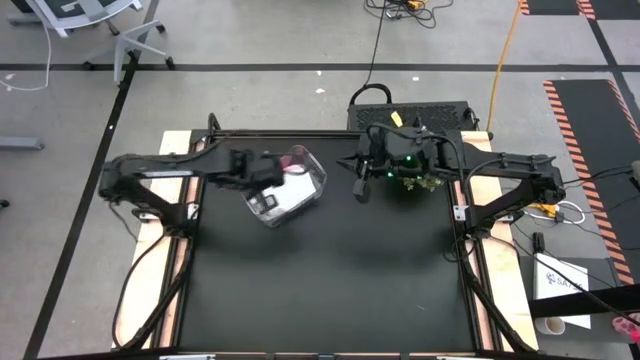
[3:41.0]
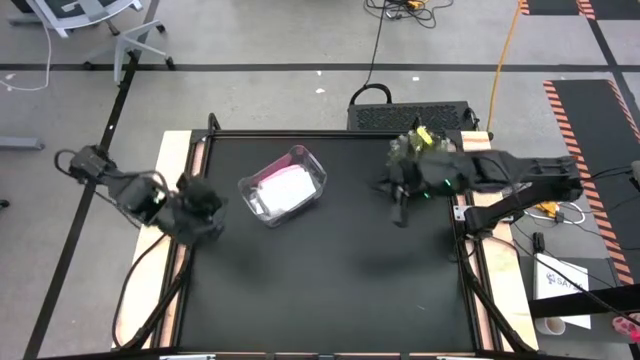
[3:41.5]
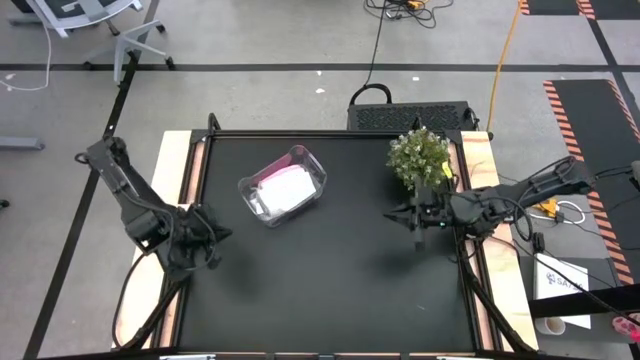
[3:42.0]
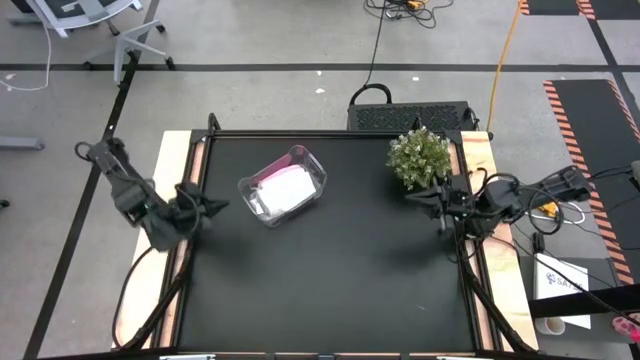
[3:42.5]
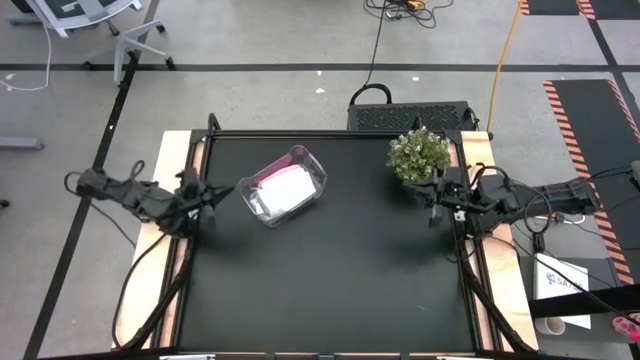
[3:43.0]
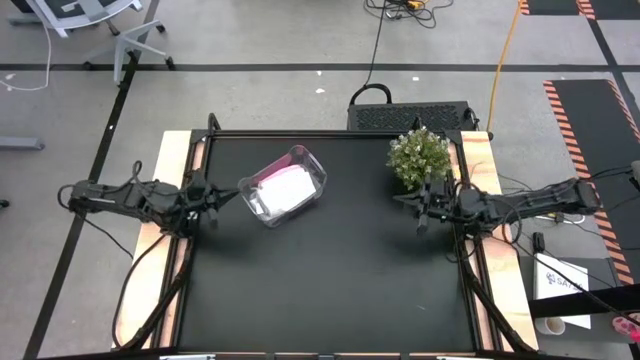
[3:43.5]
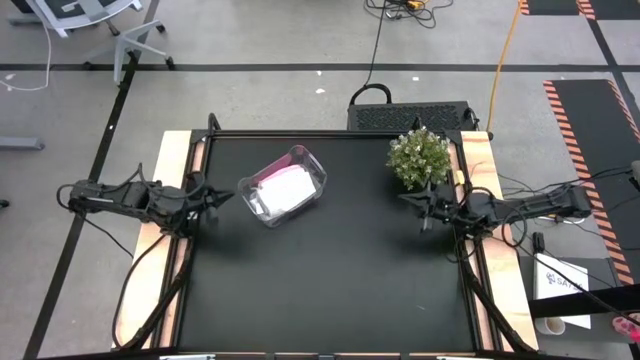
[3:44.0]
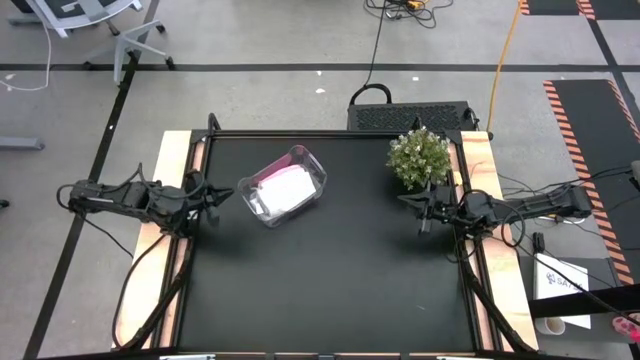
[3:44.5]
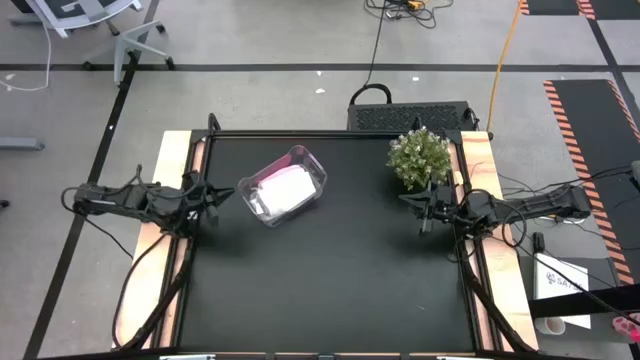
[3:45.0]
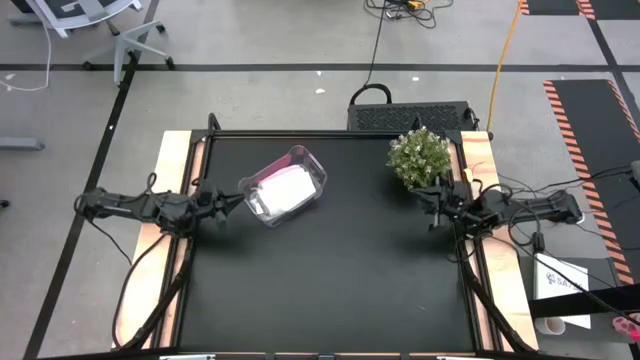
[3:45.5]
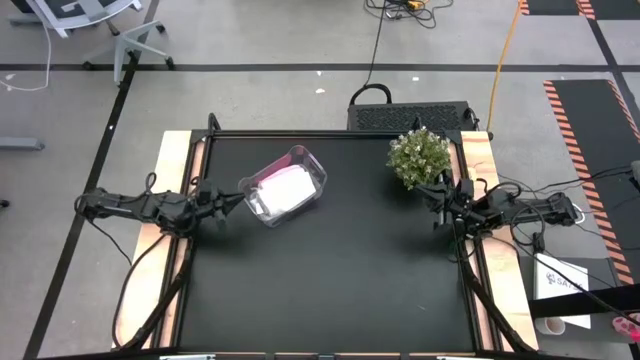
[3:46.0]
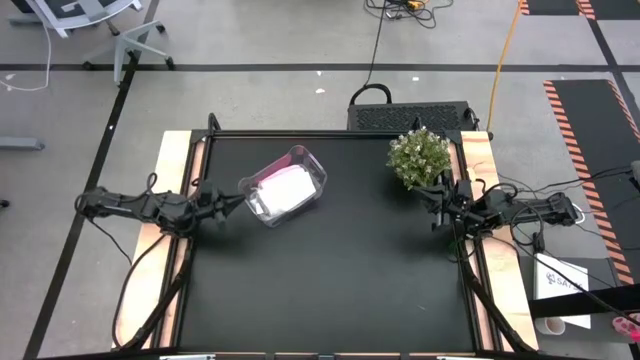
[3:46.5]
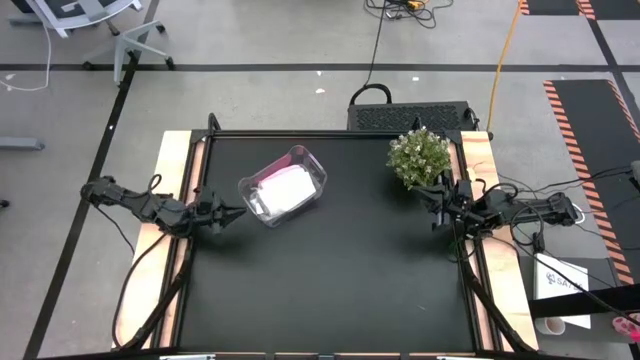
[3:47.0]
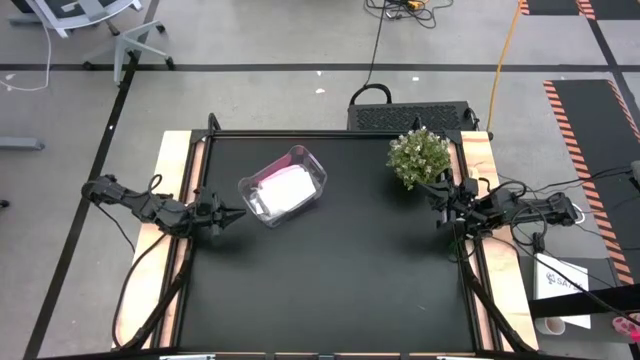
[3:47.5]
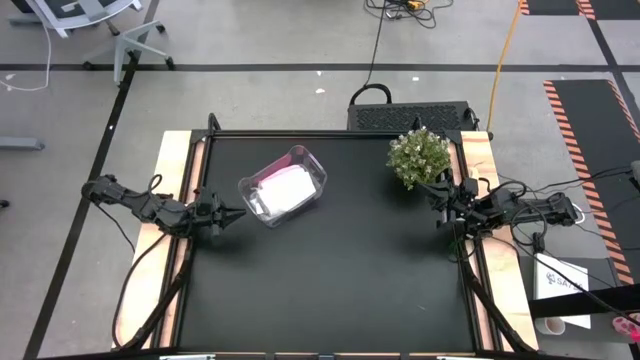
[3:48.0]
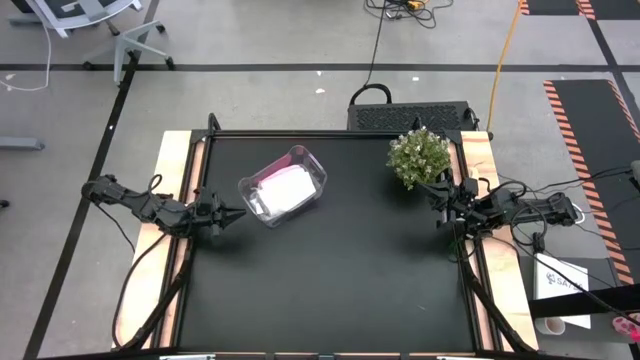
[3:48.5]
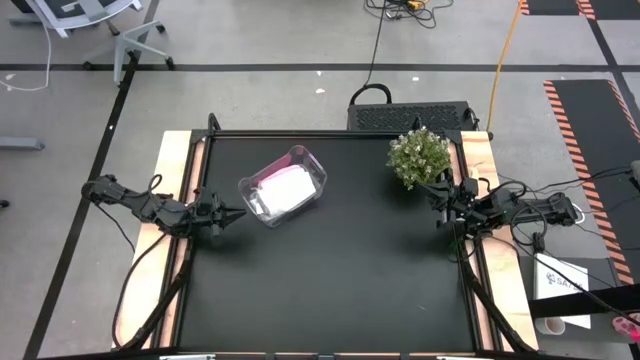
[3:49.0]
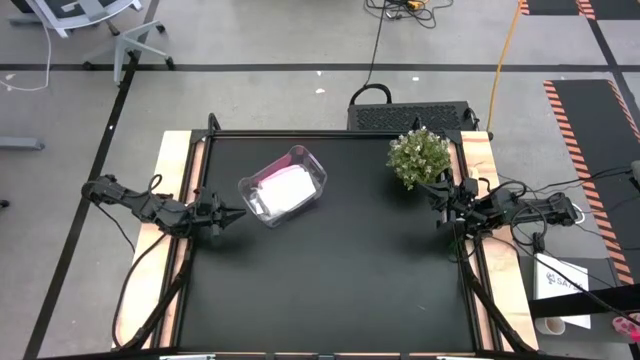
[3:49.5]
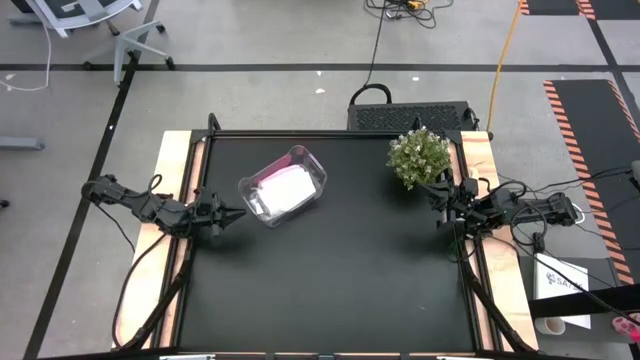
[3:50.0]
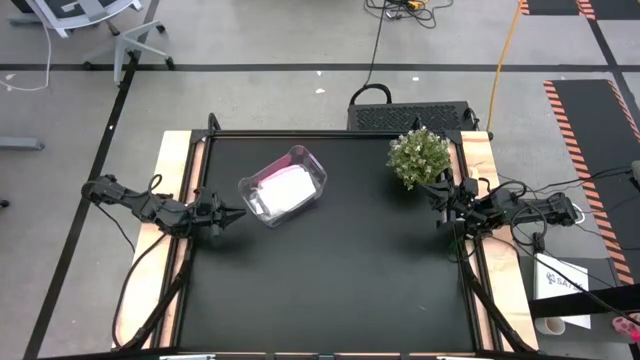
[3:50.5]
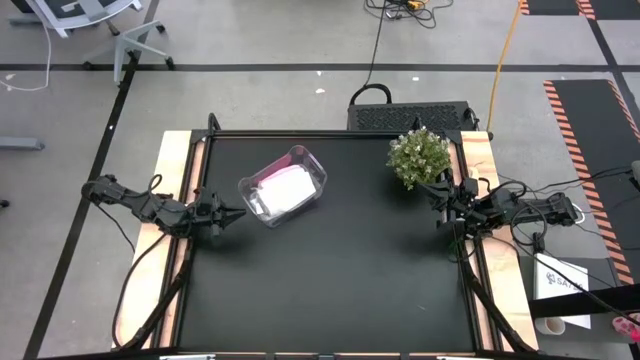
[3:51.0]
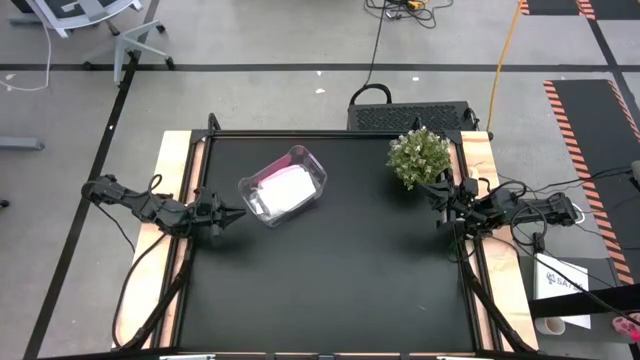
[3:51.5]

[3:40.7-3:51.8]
Task: Fold microfiber towels
Return to Home Position

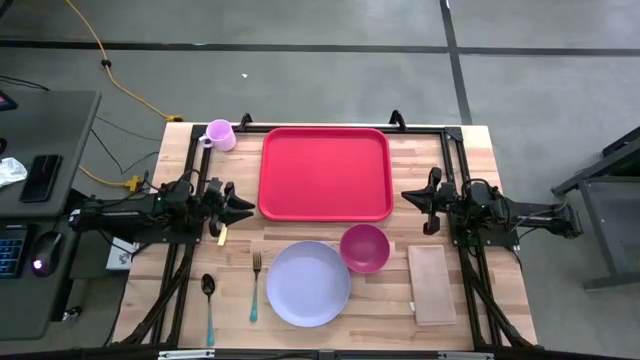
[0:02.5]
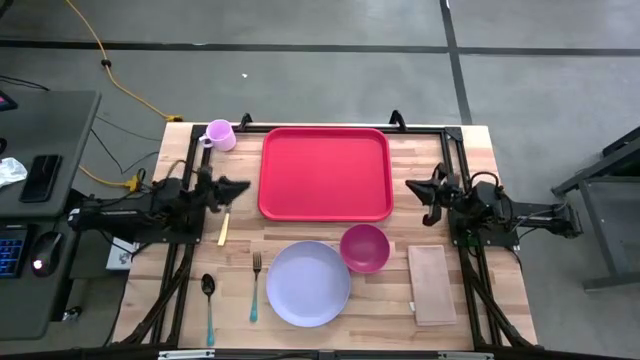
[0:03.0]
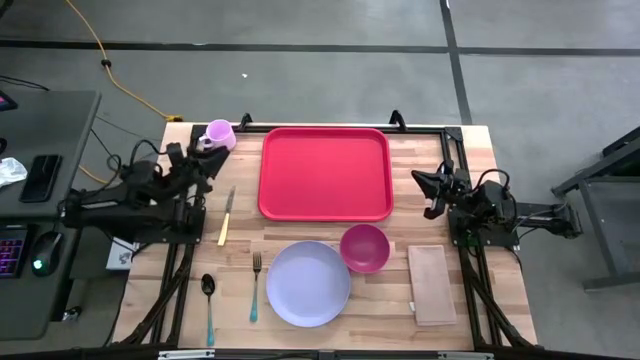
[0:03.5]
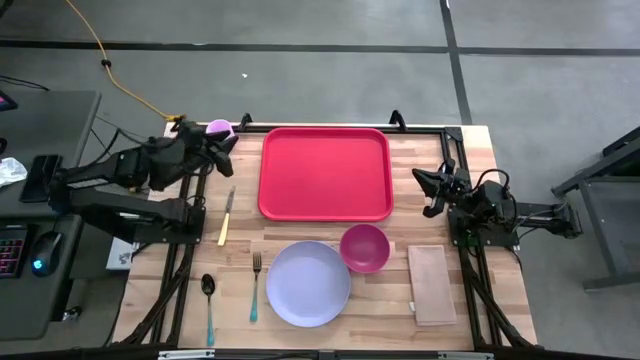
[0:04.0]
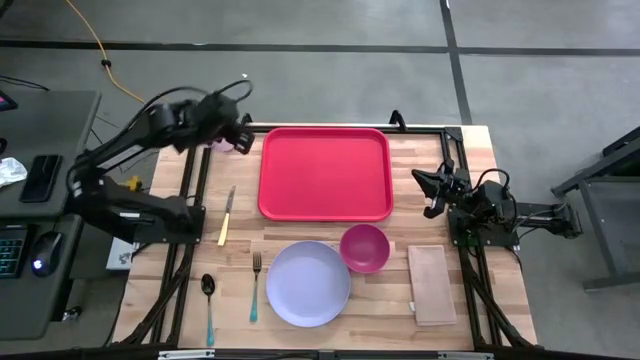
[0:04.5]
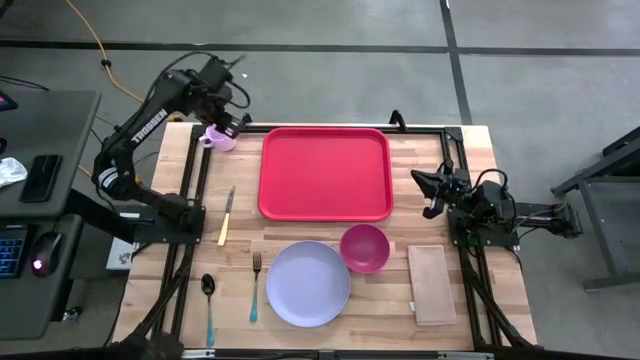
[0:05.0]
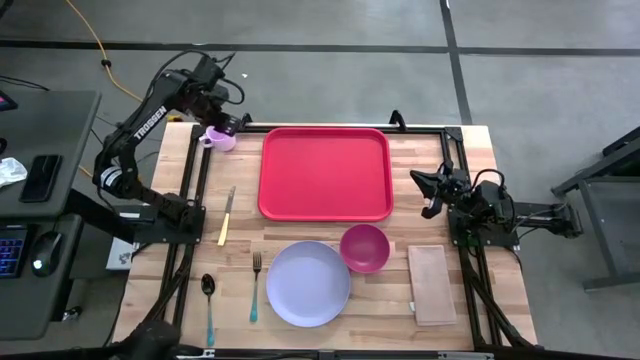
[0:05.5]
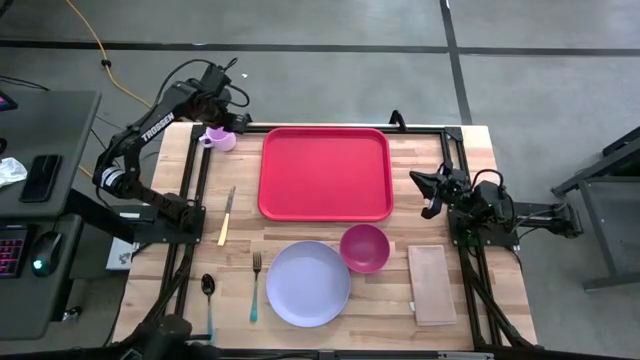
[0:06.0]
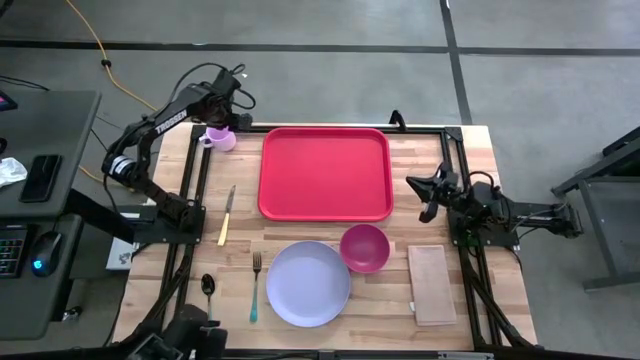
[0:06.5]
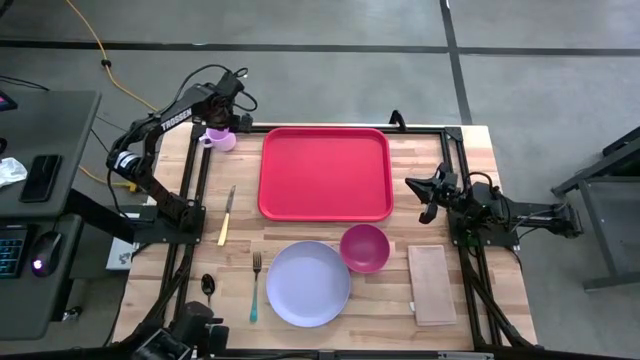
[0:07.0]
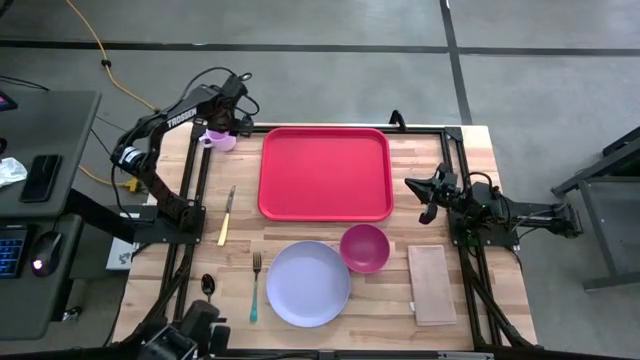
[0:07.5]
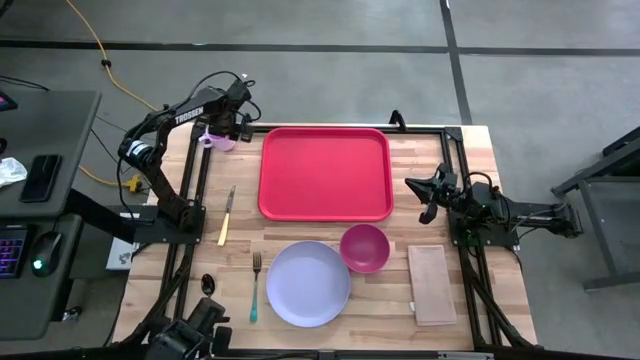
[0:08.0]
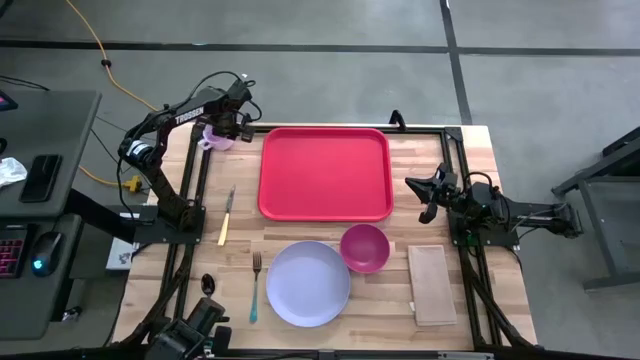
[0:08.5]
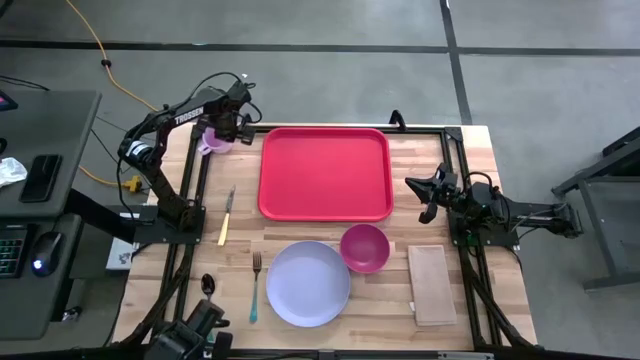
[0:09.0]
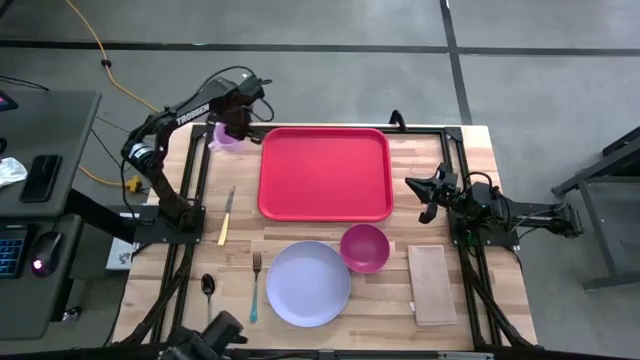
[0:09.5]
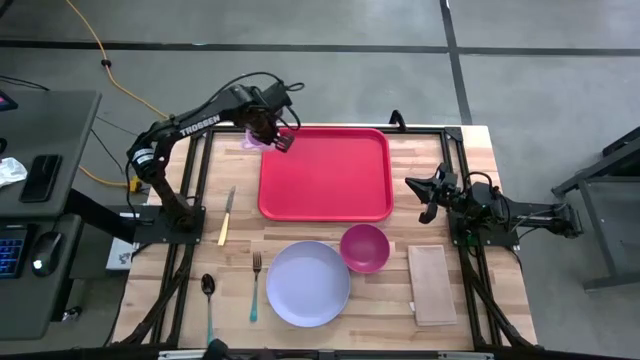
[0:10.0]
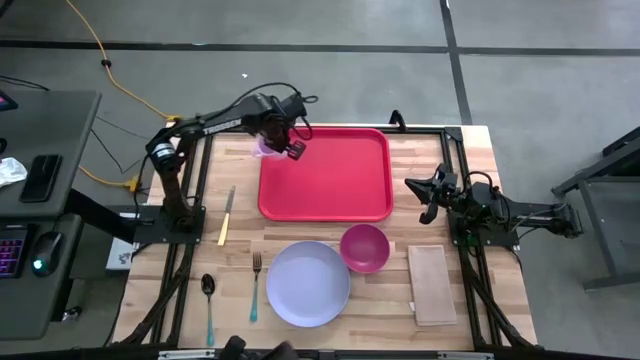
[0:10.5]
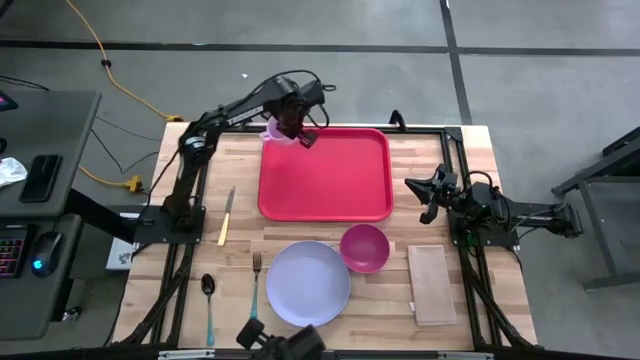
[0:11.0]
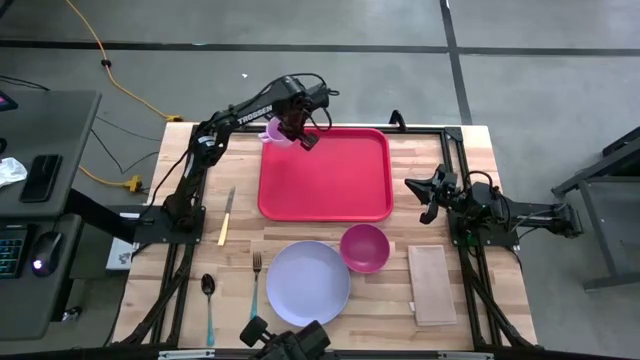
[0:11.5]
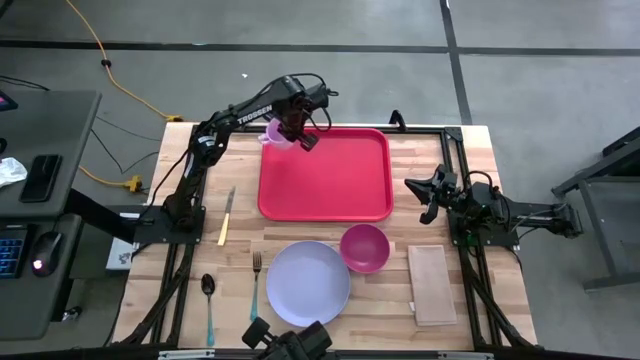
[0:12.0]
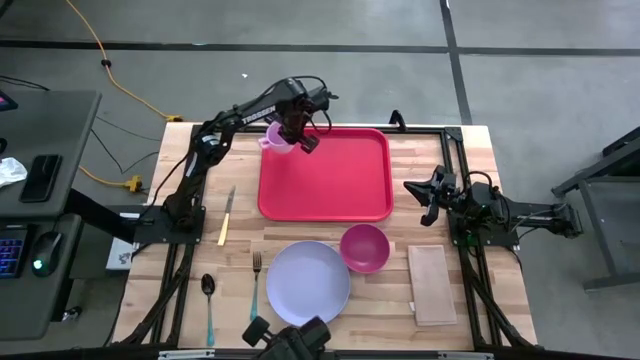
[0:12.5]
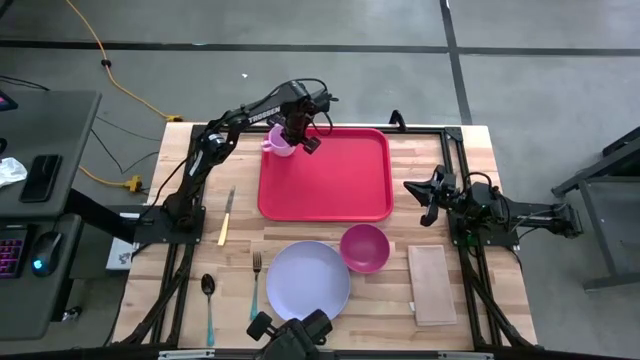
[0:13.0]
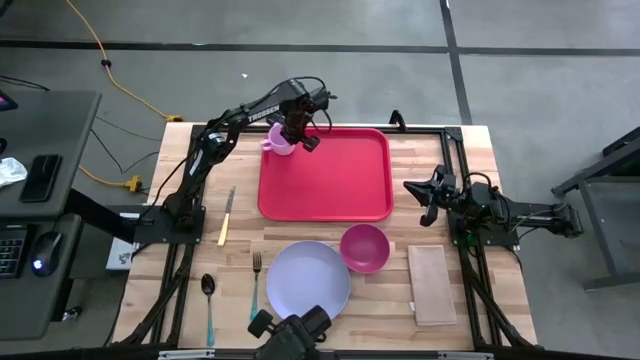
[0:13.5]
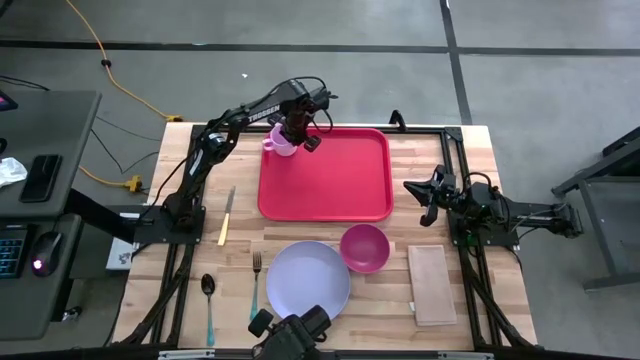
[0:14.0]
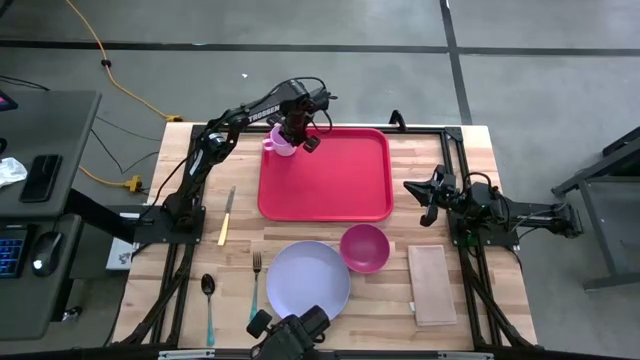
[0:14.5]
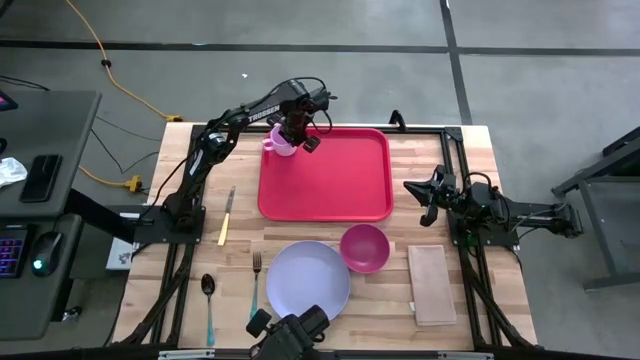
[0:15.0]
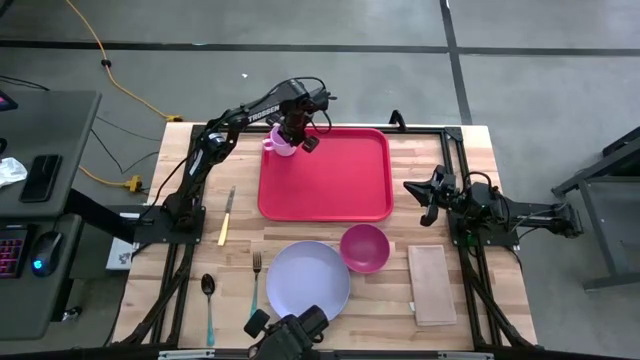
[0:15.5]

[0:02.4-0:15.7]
Task: Set up tray
Put the pink mug on the orange serving tray
